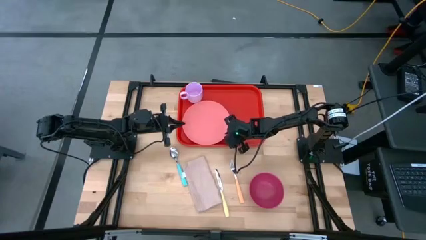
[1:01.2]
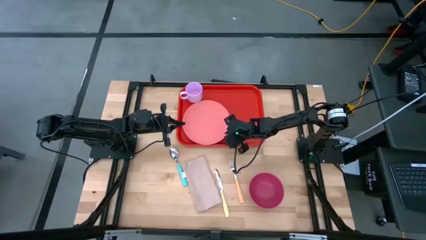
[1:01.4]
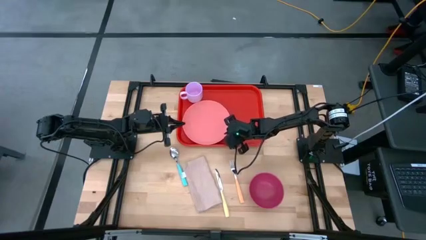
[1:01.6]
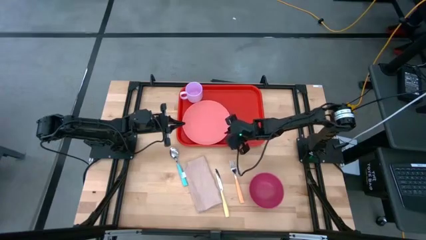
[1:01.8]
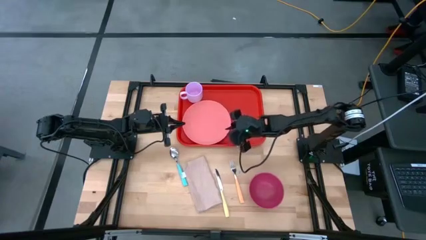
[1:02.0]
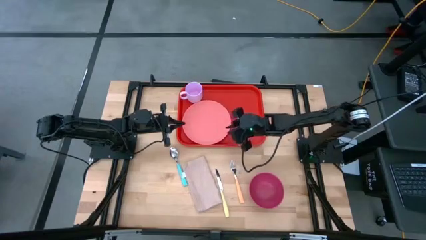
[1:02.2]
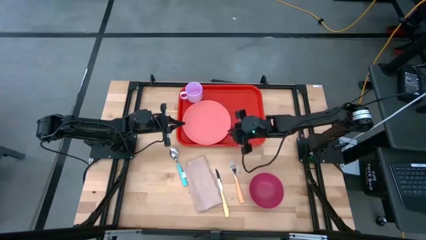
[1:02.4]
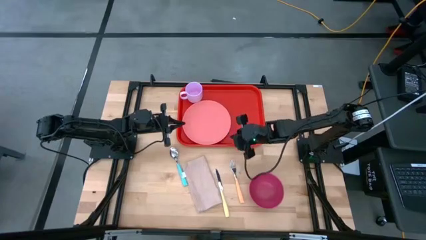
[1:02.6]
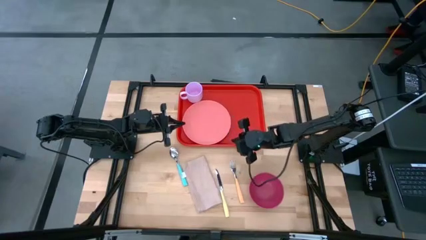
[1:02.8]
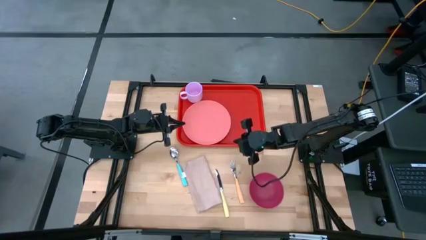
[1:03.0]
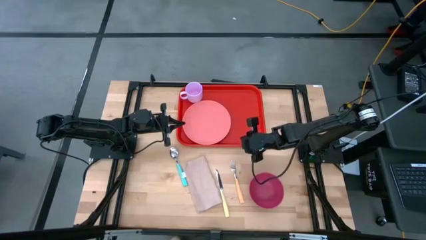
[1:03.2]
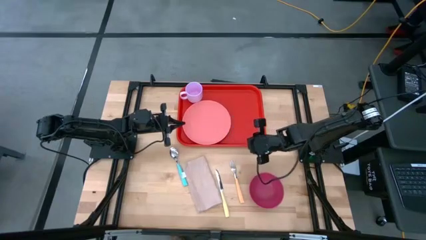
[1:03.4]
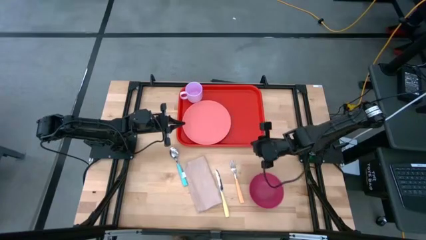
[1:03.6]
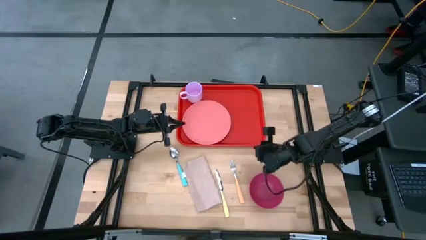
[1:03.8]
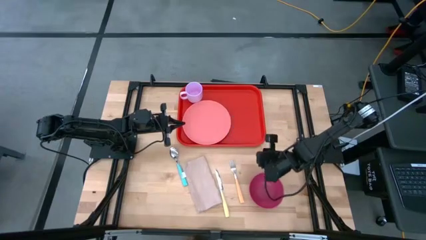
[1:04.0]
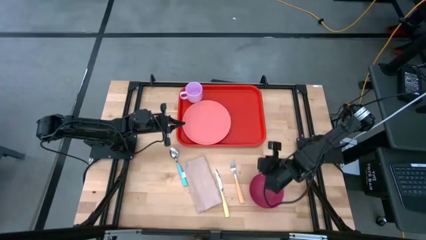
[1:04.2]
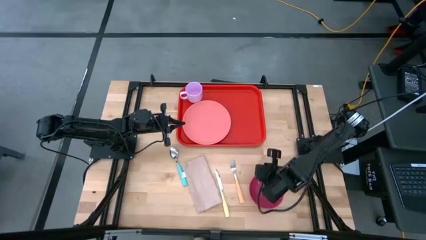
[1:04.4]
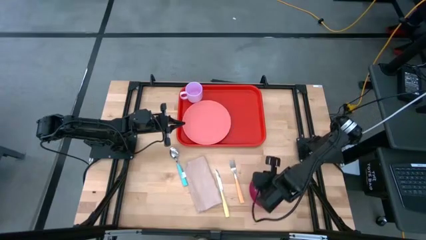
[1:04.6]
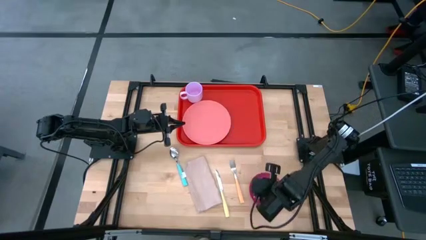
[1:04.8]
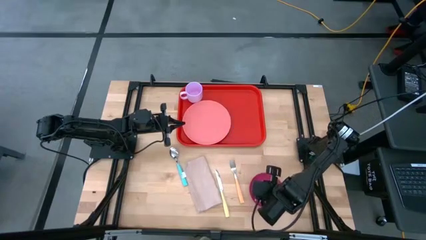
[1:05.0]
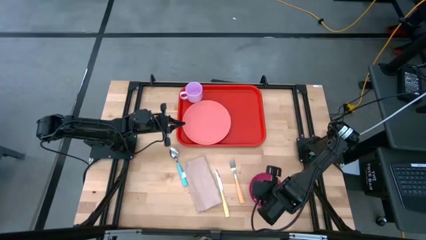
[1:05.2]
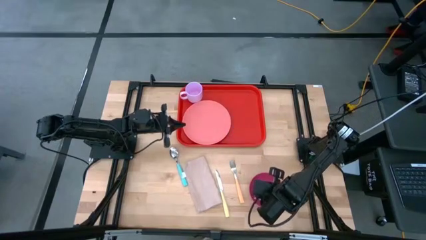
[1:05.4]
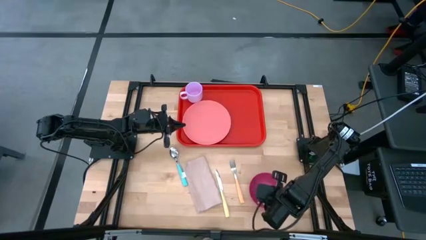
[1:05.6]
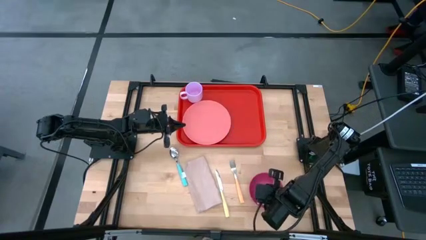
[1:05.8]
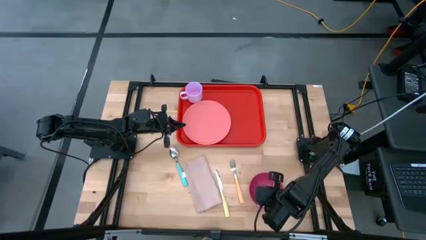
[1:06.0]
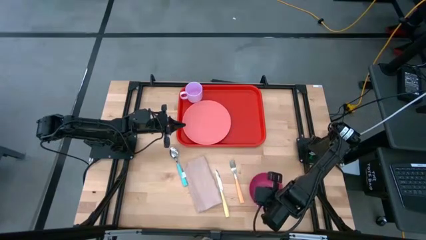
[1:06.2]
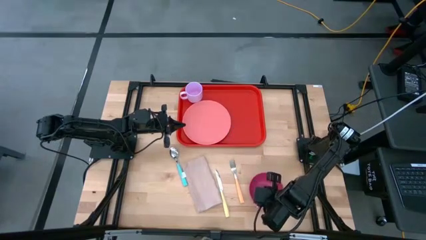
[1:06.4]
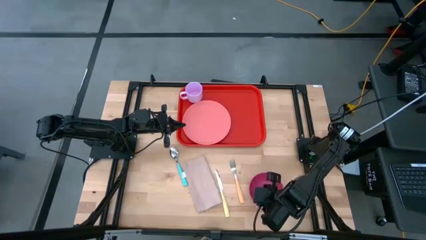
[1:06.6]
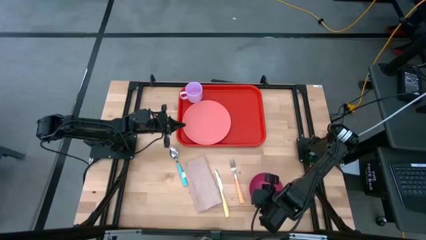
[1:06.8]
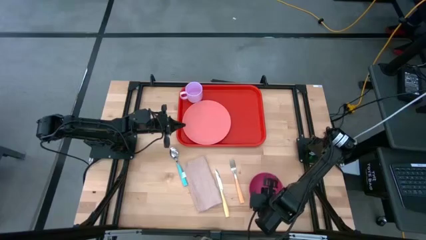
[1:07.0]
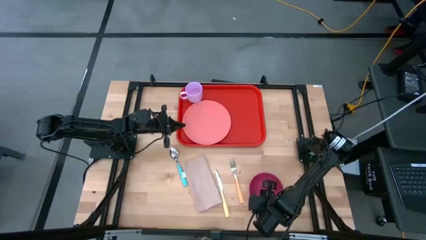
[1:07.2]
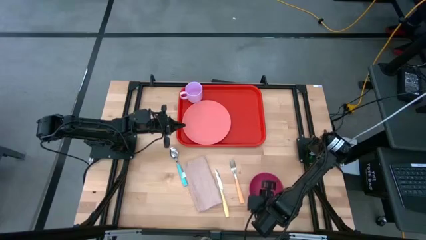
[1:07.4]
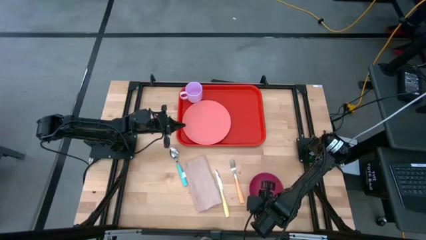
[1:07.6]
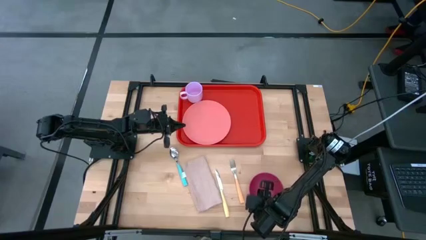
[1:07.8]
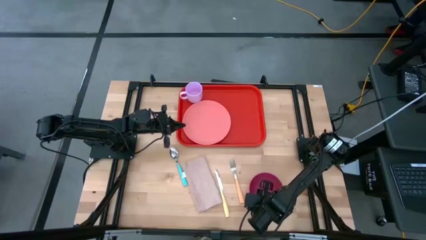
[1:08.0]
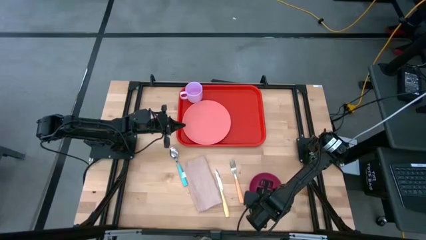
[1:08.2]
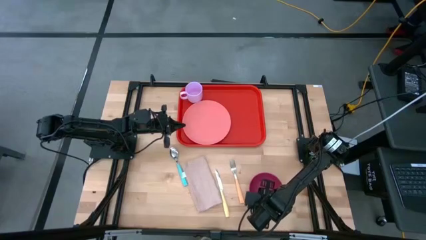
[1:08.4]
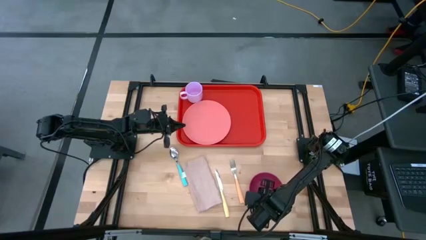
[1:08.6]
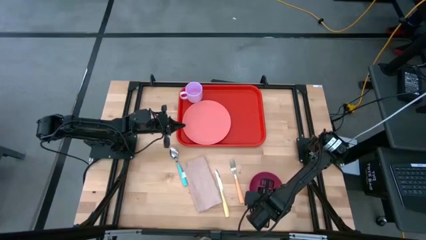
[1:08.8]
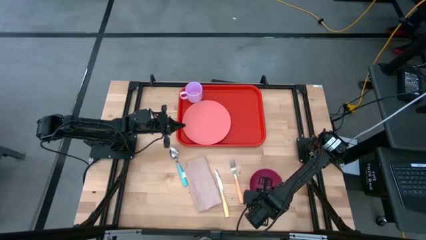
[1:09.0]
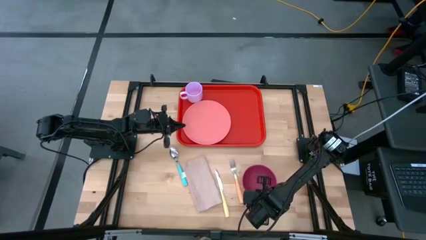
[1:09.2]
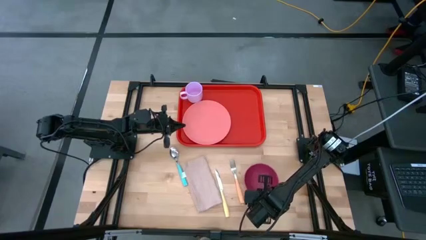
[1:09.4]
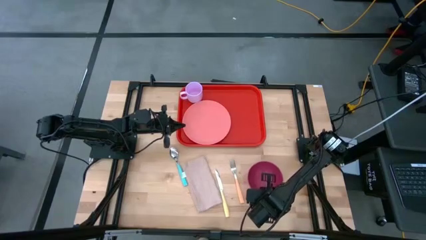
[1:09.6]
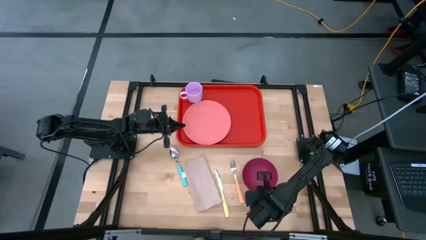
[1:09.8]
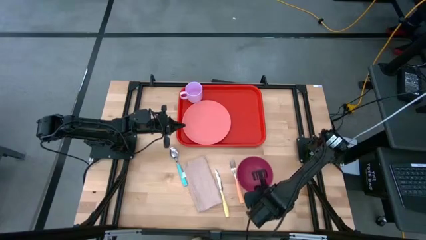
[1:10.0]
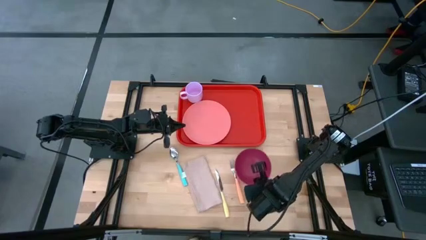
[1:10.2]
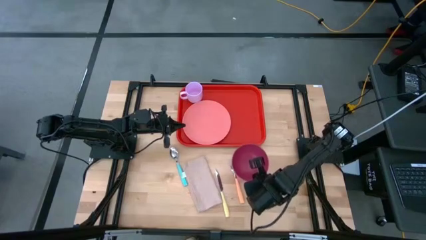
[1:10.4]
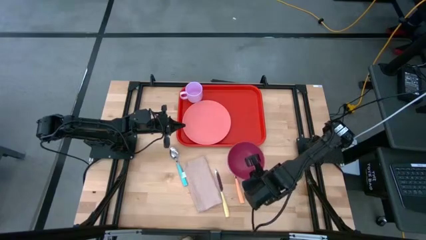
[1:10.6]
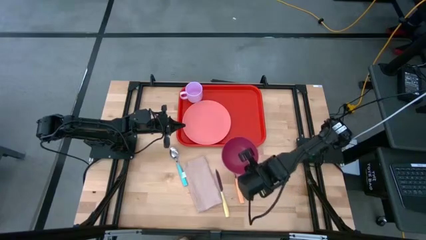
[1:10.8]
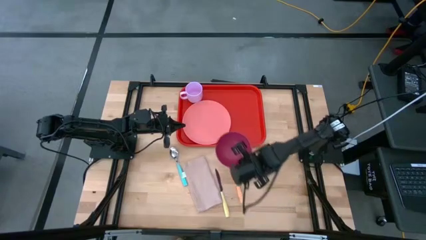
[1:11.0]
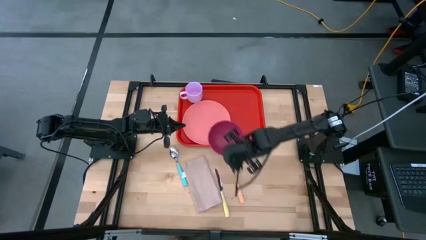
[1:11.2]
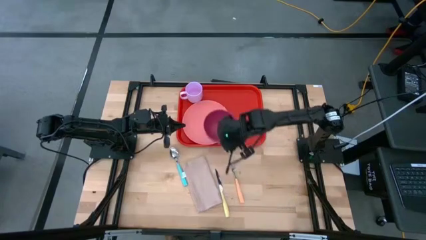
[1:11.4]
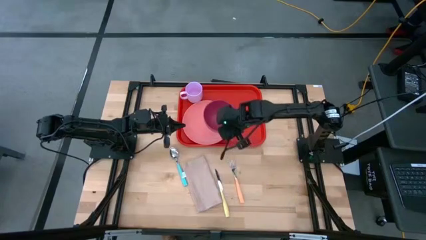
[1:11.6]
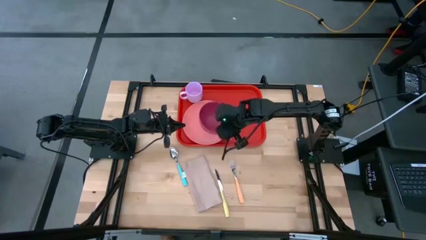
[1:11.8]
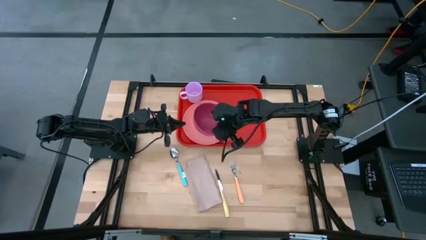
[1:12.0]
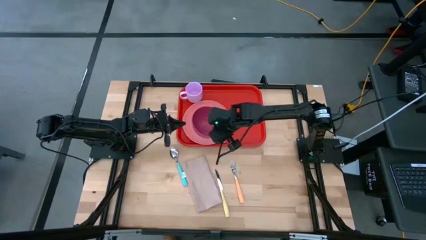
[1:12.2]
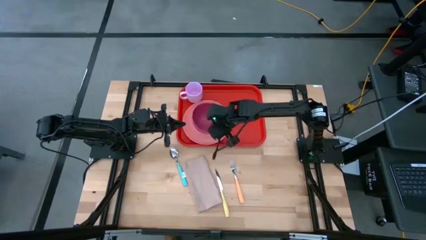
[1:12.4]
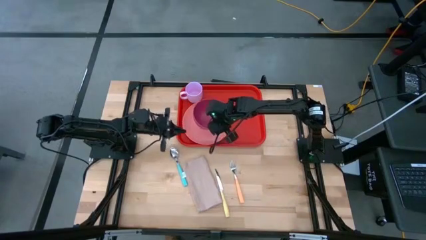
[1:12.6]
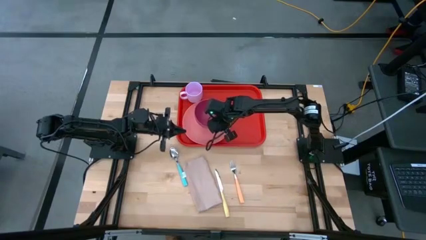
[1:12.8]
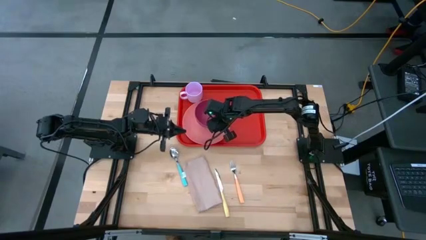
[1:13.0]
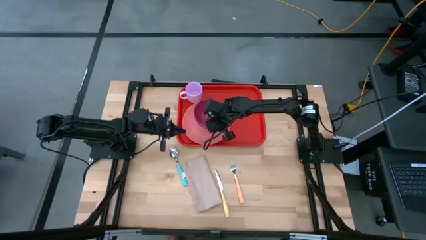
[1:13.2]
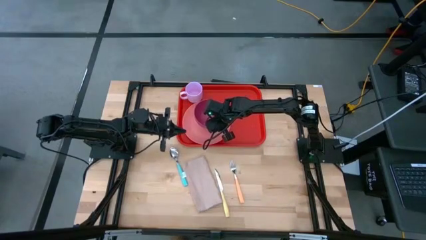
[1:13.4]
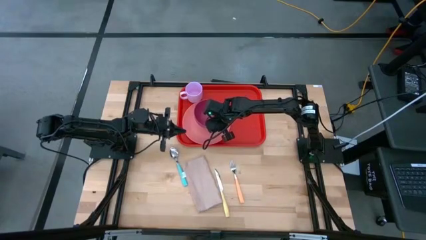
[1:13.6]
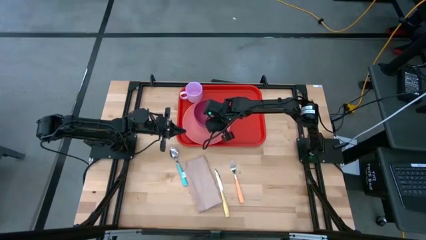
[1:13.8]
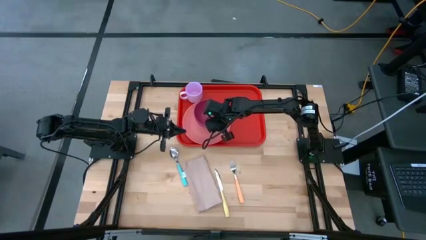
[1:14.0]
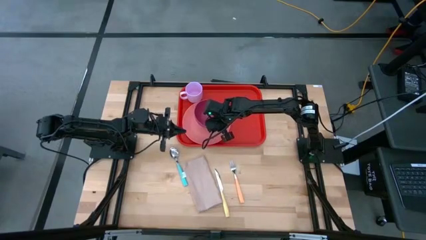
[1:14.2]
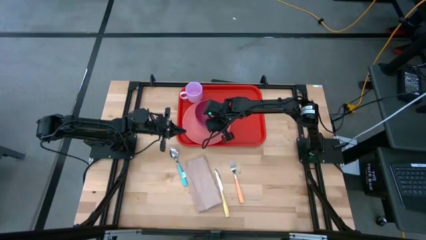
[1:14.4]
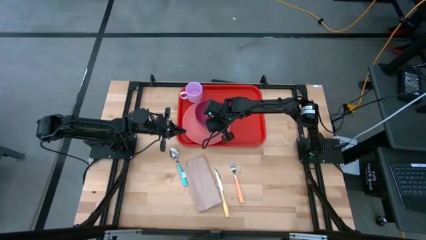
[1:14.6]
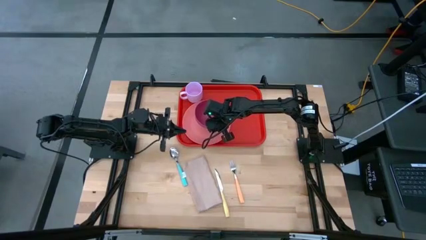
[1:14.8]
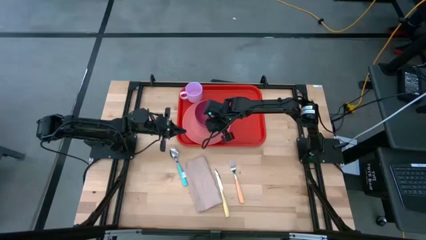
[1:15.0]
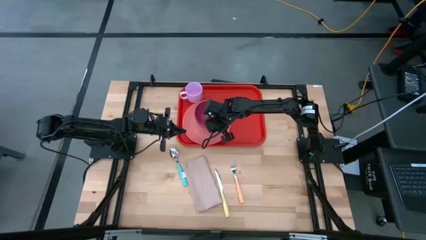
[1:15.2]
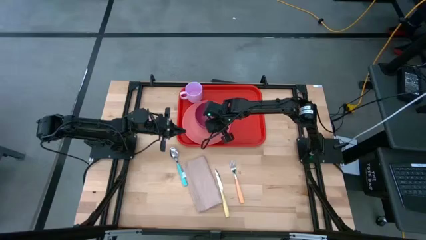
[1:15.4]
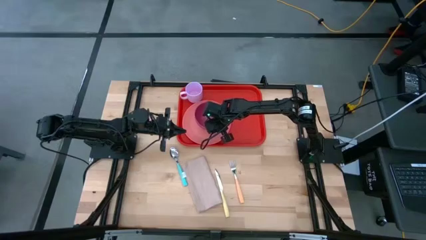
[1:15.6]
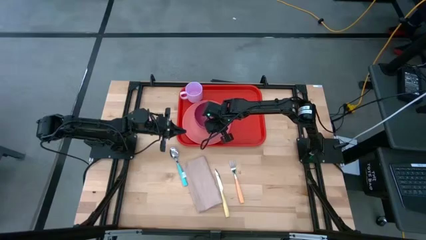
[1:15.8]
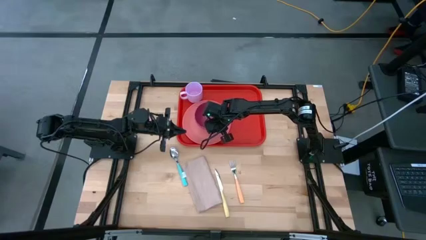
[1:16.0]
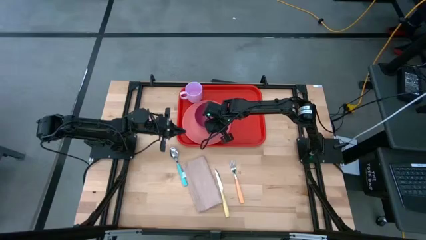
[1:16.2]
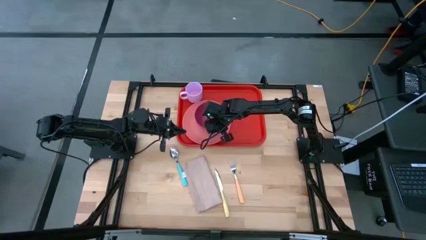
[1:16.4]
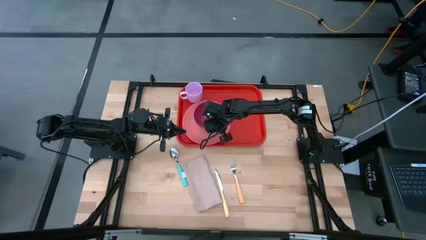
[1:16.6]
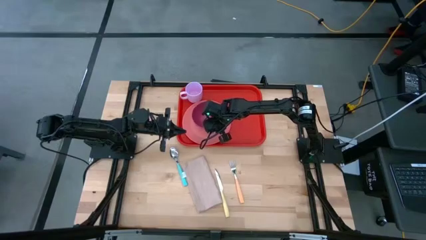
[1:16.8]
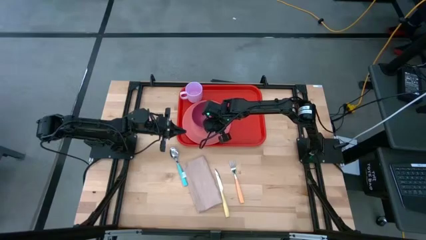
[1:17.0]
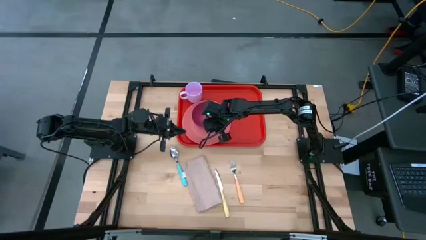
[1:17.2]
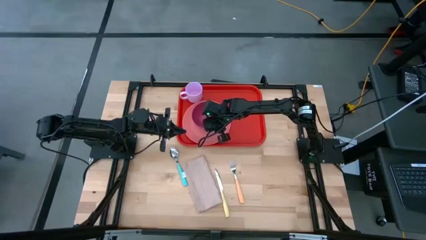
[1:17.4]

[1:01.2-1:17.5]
Task: Set up tray
Put the pink bowl on top of the light pink plate on the red tray
